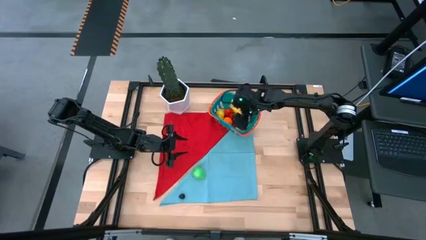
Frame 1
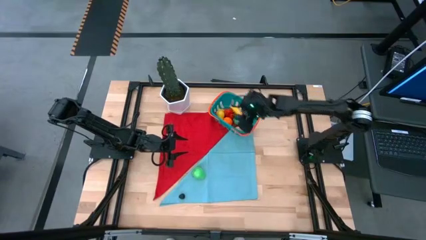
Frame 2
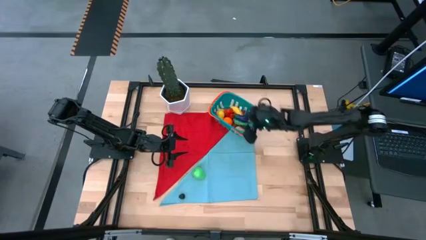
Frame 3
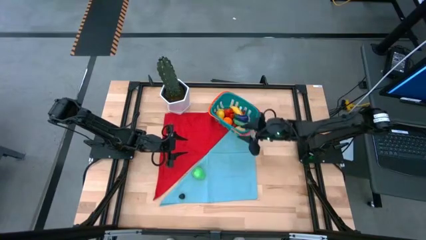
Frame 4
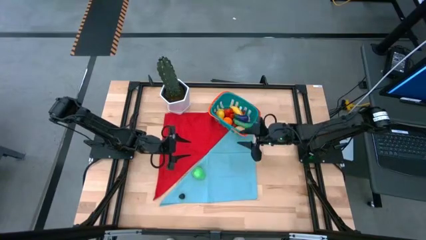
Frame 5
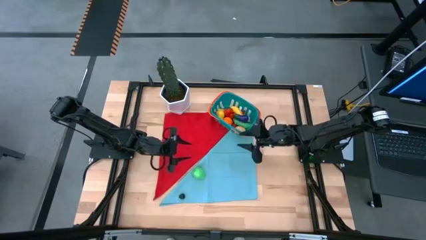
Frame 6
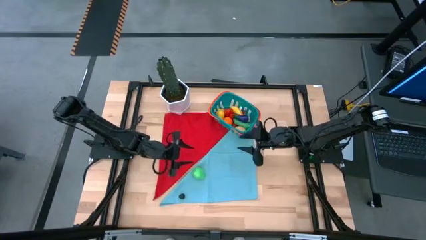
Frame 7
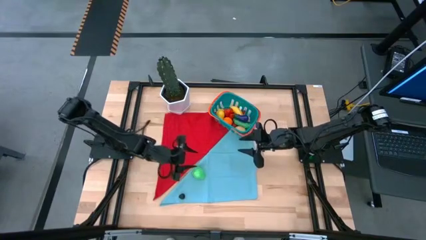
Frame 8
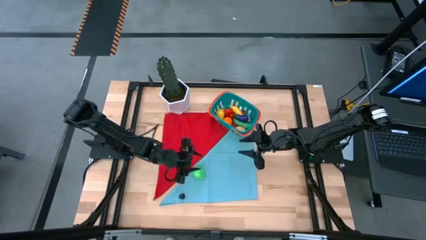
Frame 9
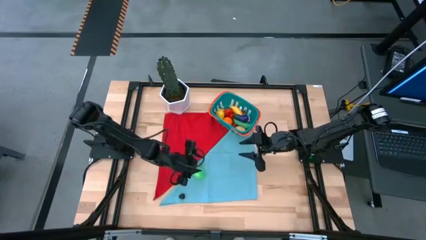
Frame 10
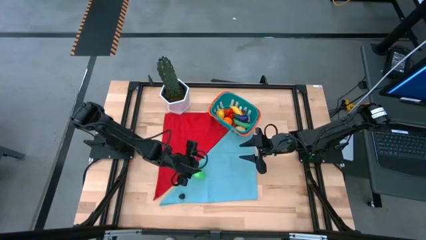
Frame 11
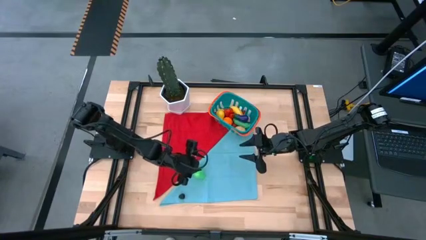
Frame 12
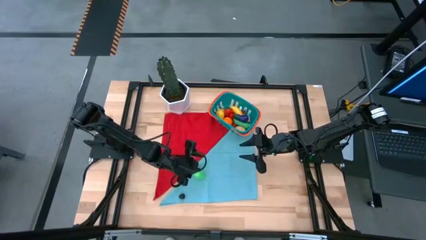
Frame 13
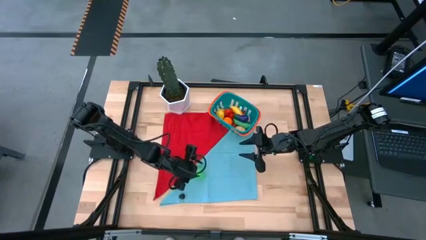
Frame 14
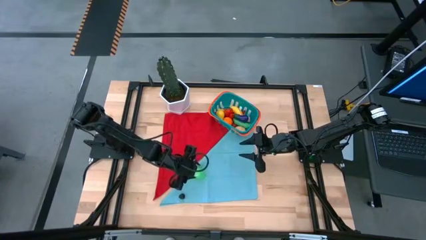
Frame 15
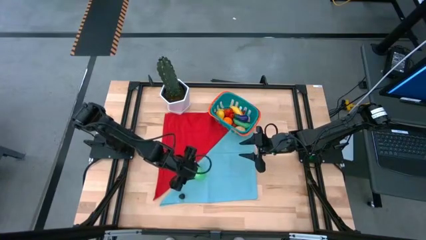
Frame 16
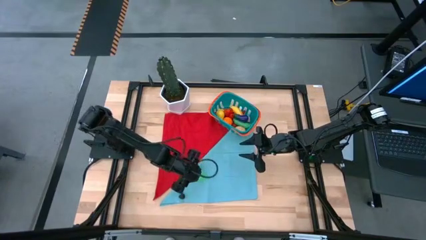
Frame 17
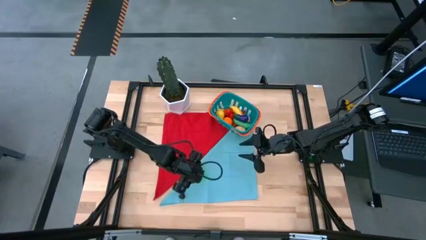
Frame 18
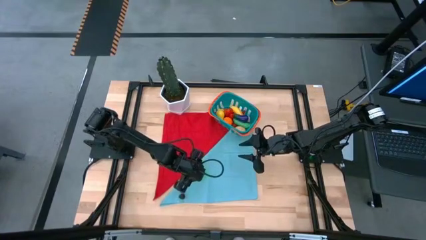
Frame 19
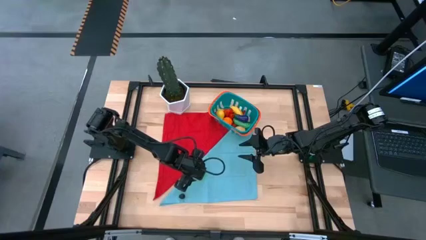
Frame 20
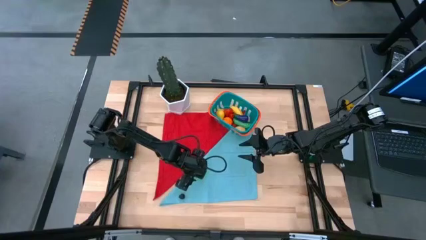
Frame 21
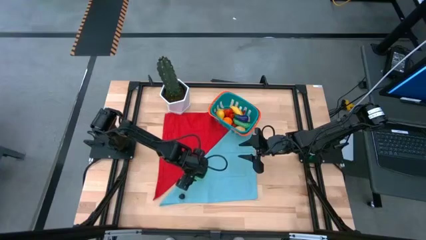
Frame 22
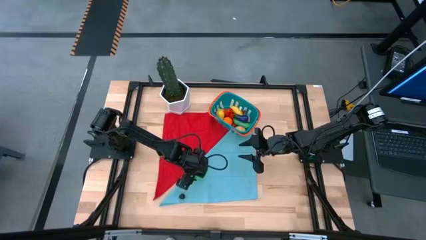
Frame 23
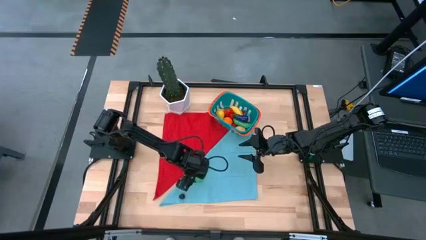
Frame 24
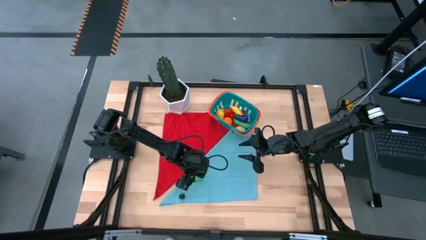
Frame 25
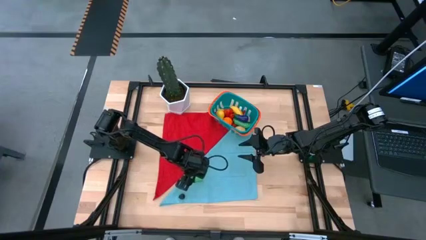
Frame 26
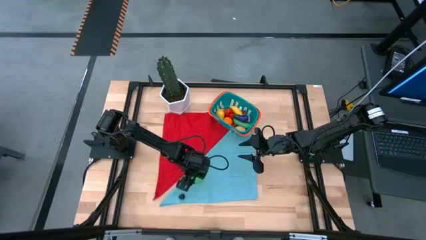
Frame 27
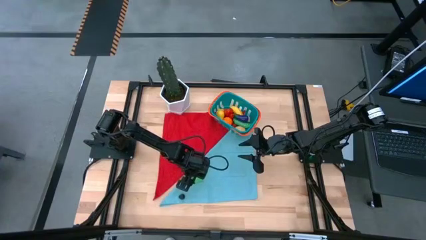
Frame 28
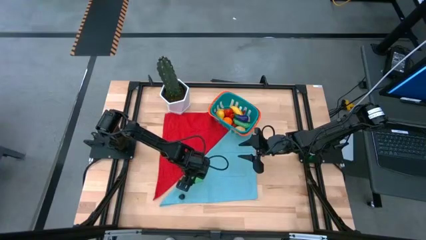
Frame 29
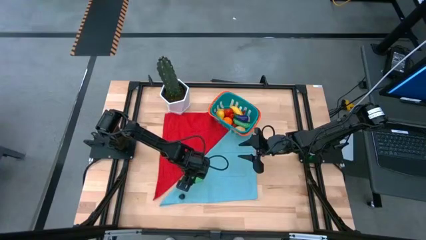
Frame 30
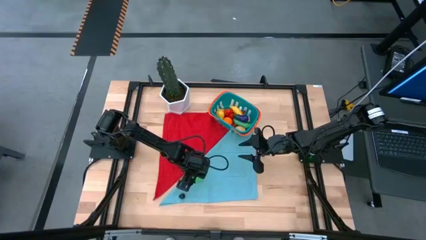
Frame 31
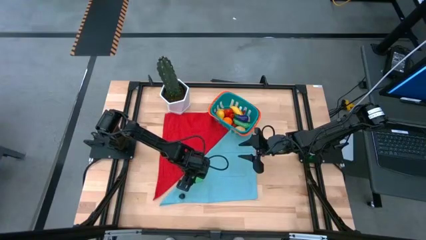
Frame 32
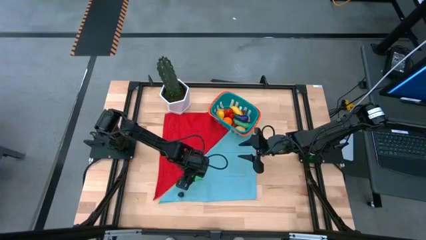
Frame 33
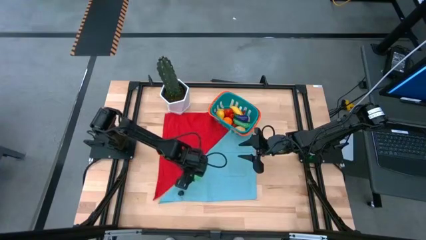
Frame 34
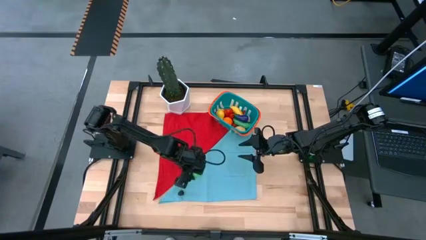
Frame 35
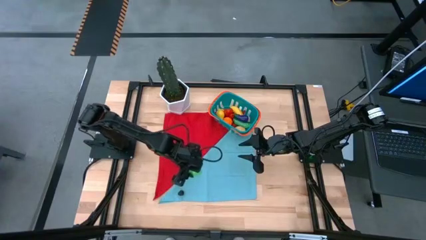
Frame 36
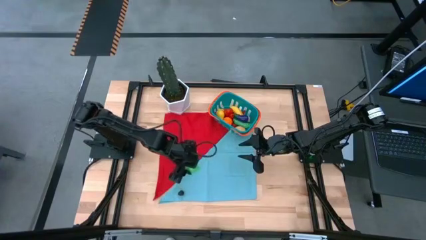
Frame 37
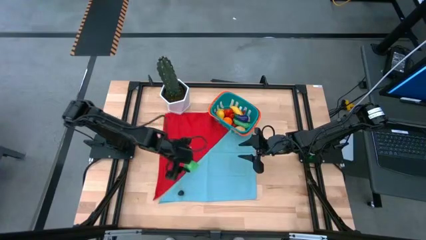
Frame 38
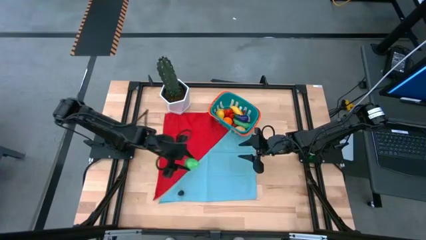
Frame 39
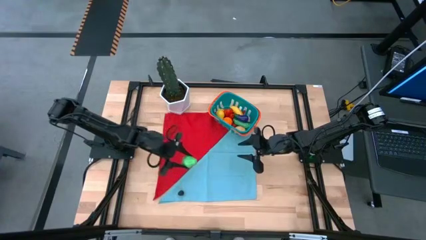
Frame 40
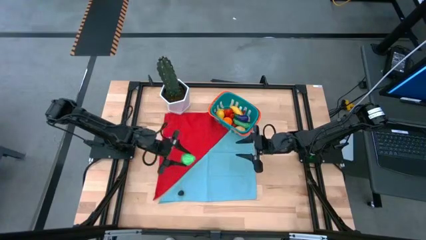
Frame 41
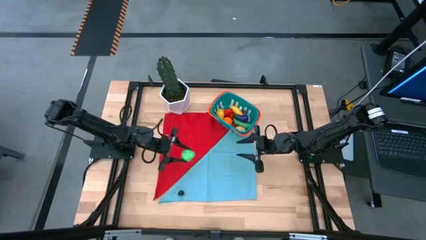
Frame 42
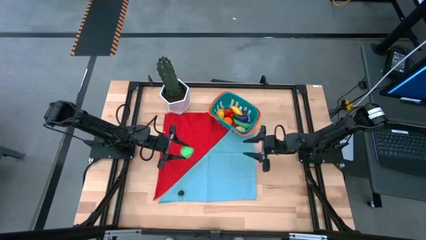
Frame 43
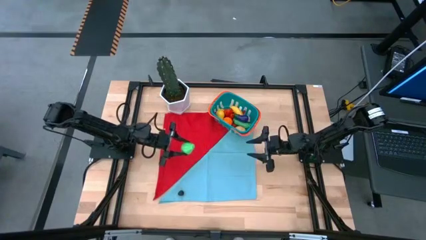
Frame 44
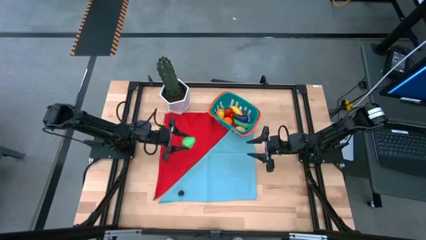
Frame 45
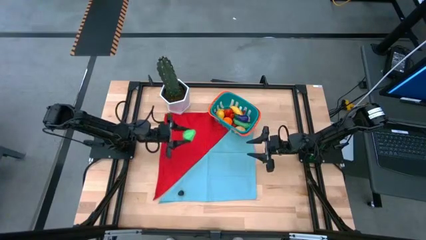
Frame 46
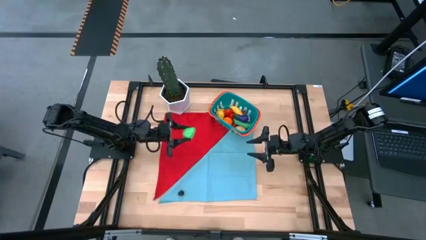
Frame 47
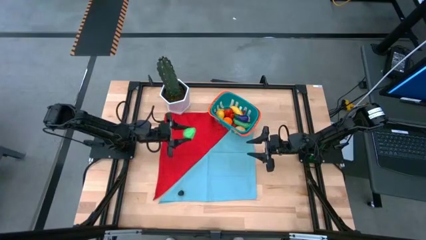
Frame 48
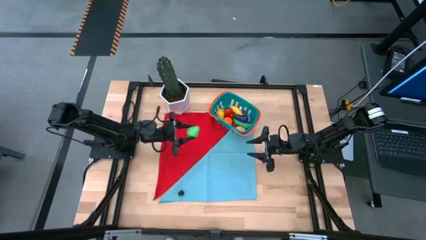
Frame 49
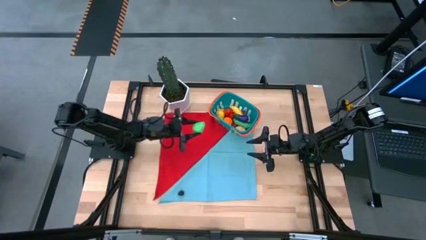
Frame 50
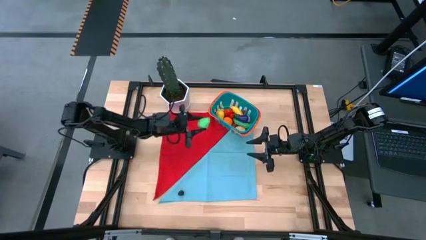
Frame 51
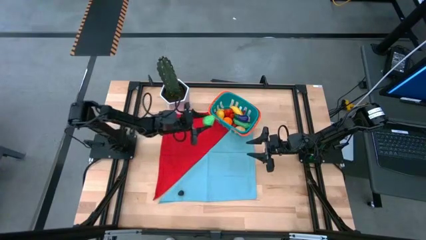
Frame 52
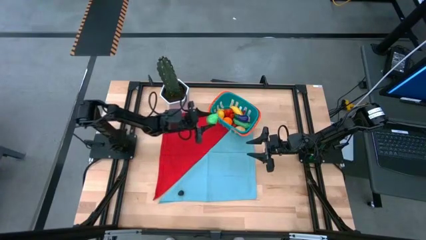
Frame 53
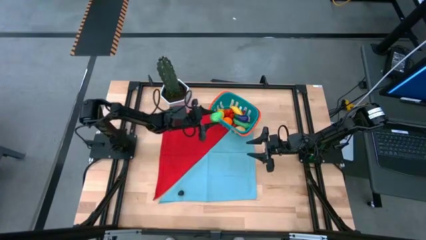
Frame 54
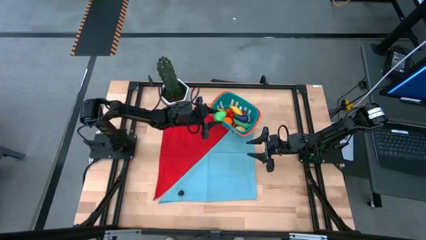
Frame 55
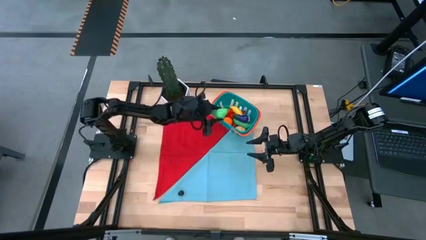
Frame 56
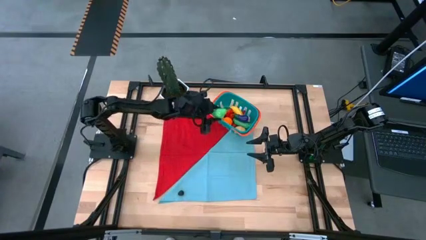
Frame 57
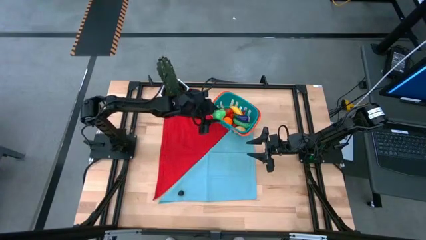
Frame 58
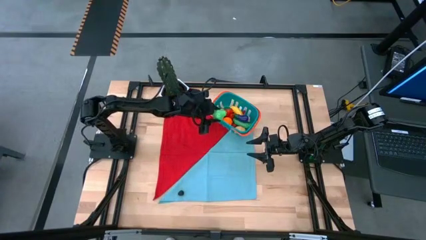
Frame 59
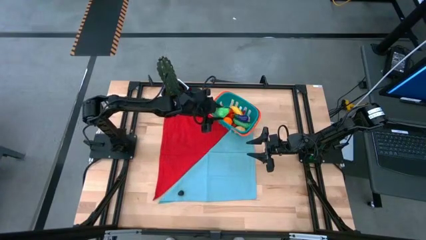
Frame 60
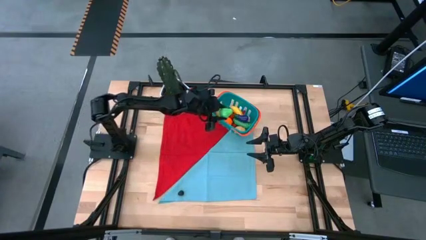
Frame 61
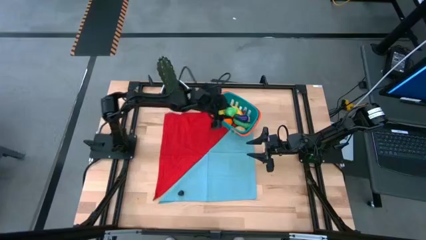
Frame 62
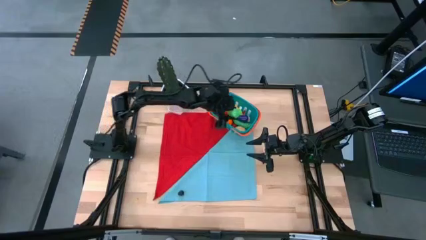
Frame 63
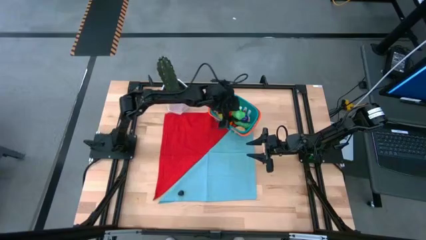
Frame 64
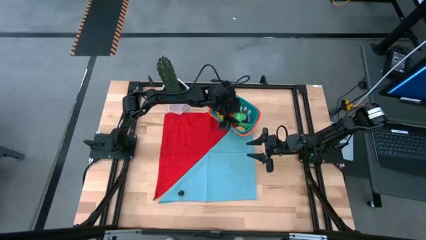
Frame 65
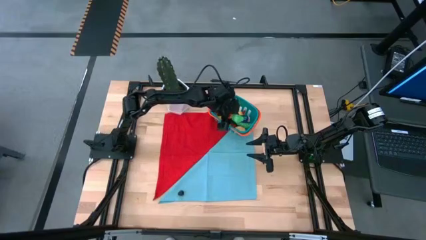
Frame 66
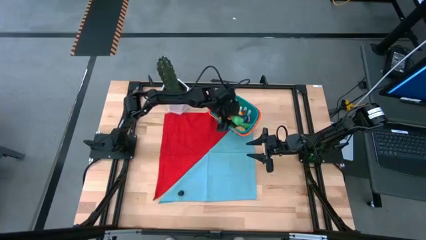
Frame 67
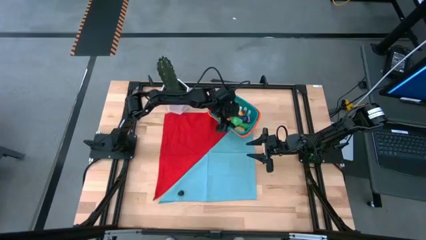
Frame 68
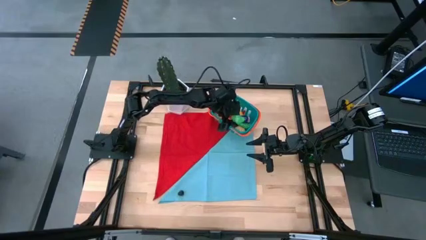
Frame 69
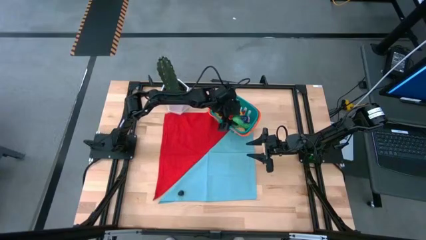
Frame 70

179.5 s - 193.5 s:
Task: Pick and placing Produce into tupperware
Put the green pear into the blue basket
